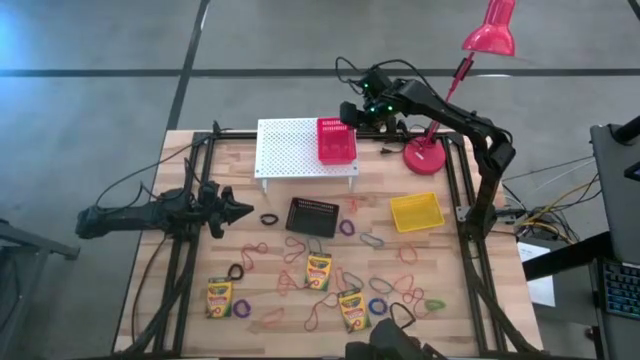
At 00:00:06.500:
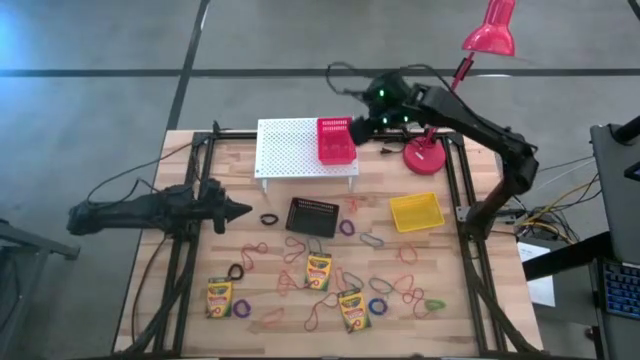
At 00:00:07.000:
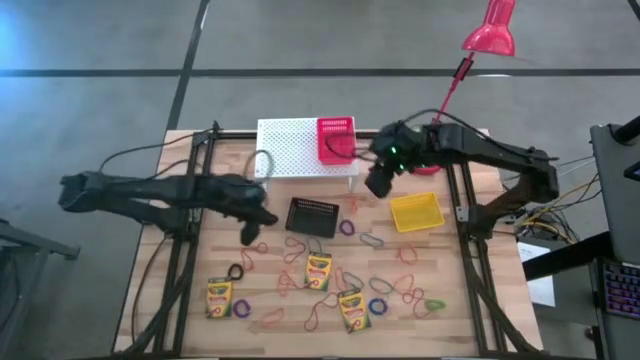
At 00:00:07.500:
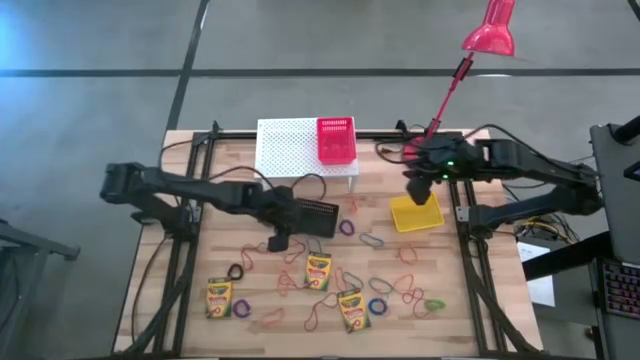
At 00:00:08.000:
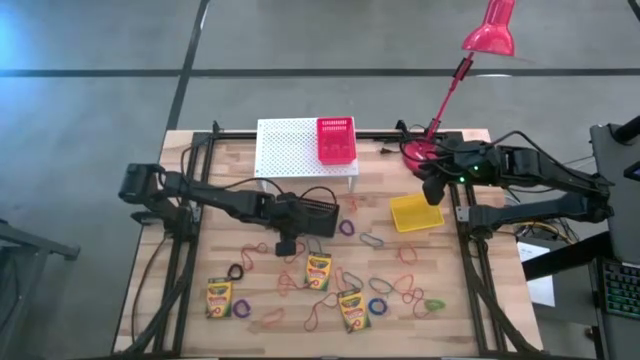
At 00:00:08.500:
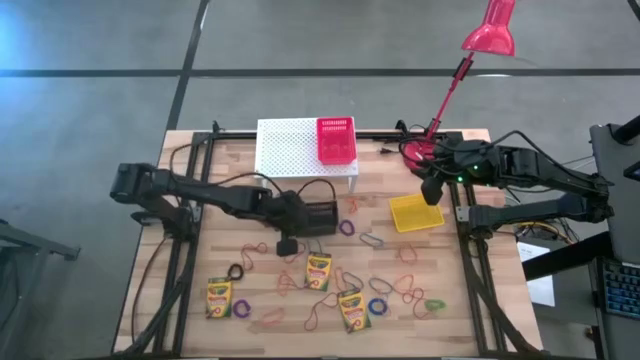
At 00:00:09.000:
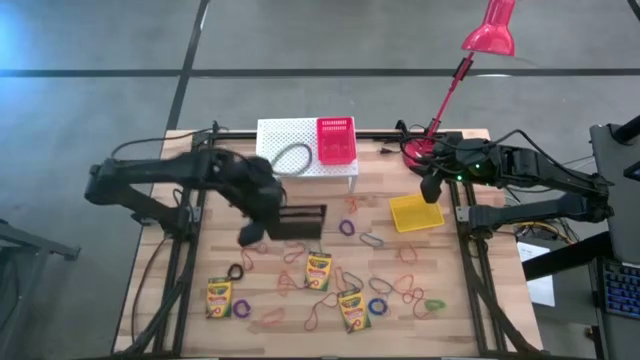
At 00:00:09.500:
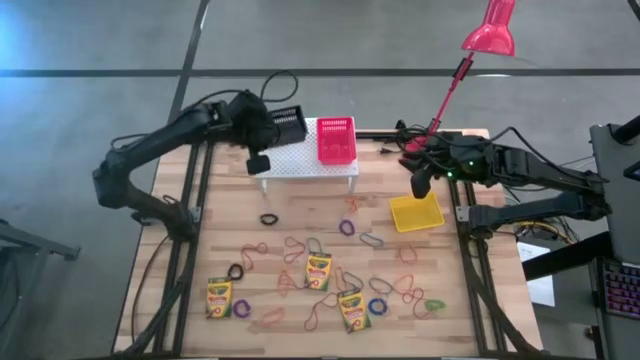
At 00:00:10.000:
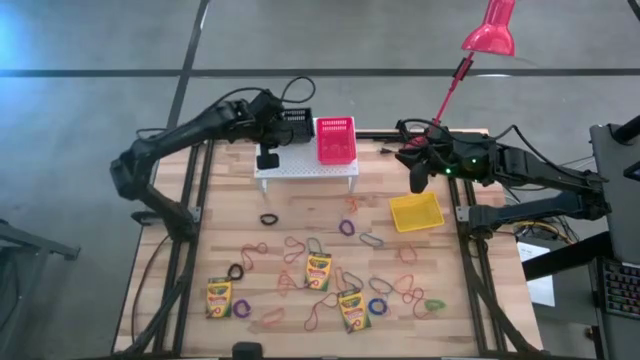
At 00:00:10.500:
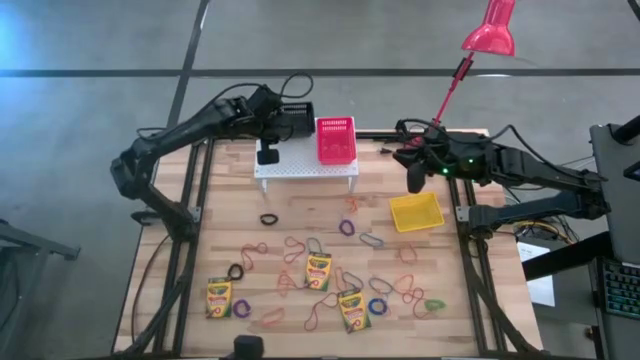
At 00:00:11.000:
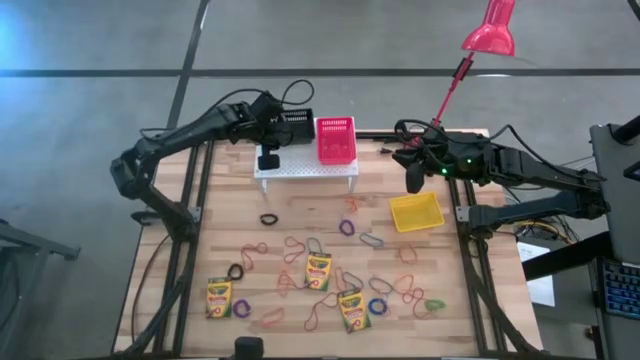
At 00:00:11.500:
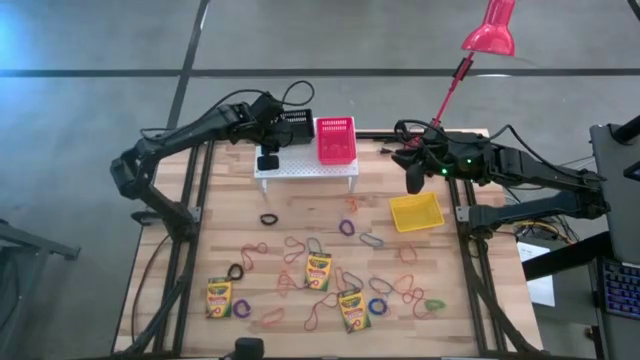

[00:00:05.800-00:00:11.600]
Task: Pick & Place Office Desk Supplies
Put the black basket on the shelf

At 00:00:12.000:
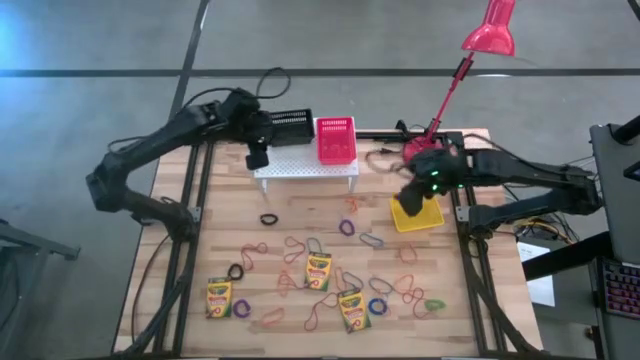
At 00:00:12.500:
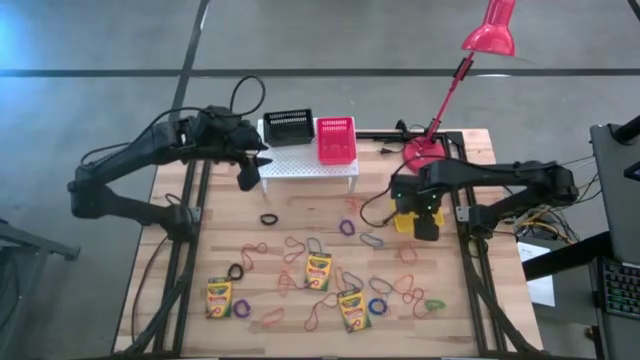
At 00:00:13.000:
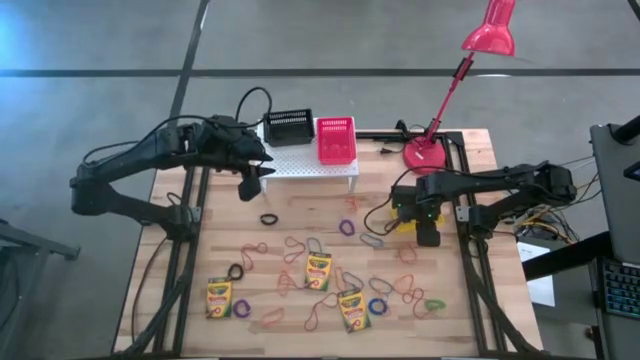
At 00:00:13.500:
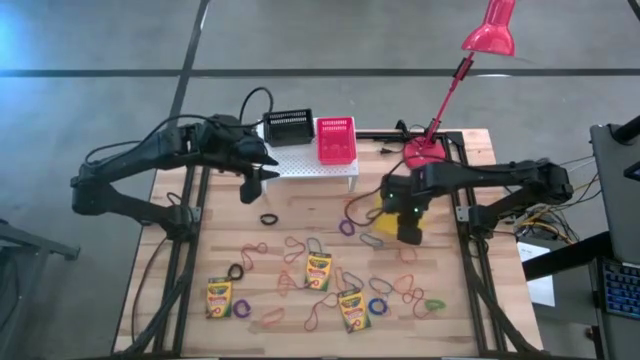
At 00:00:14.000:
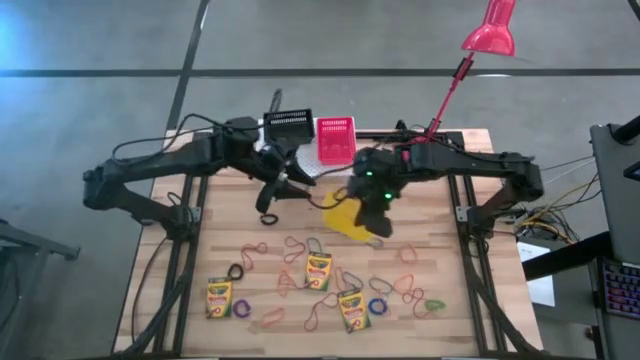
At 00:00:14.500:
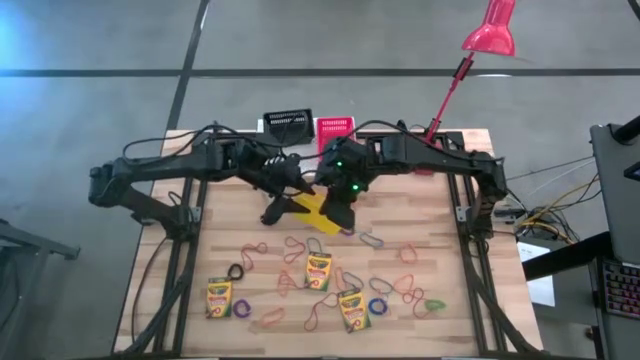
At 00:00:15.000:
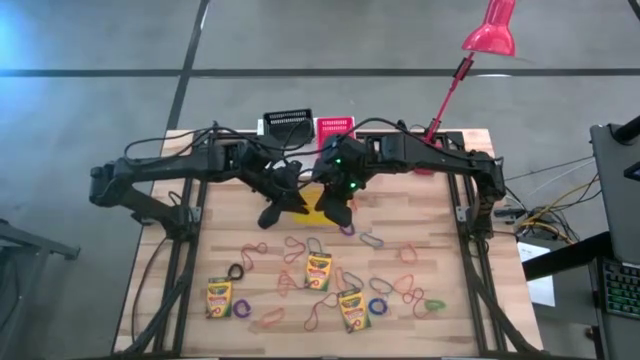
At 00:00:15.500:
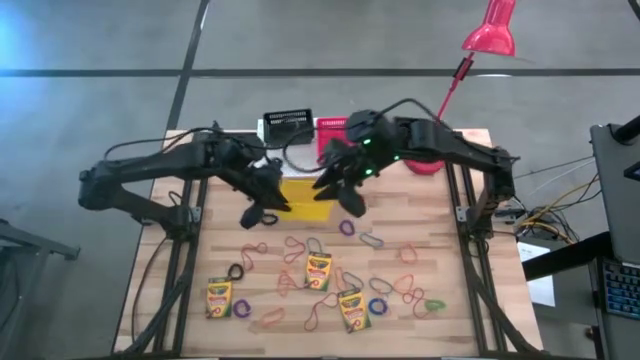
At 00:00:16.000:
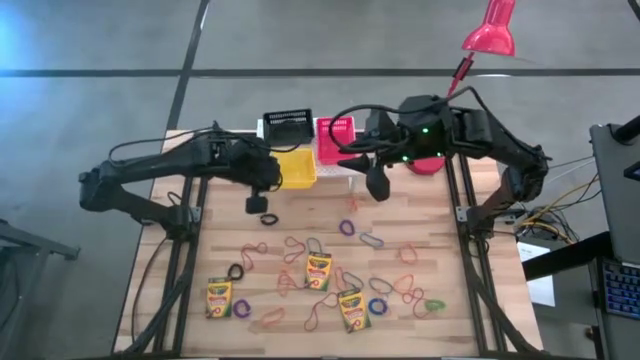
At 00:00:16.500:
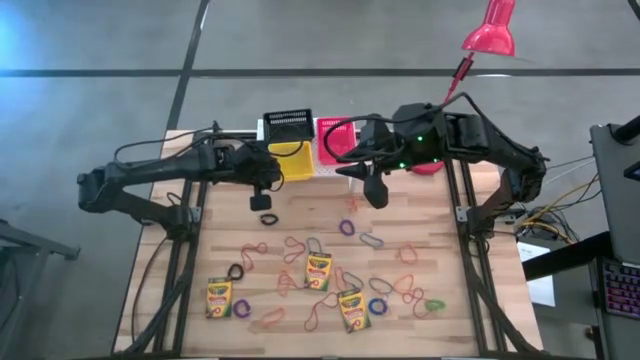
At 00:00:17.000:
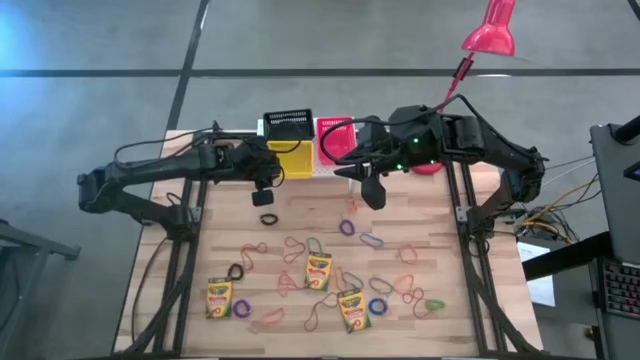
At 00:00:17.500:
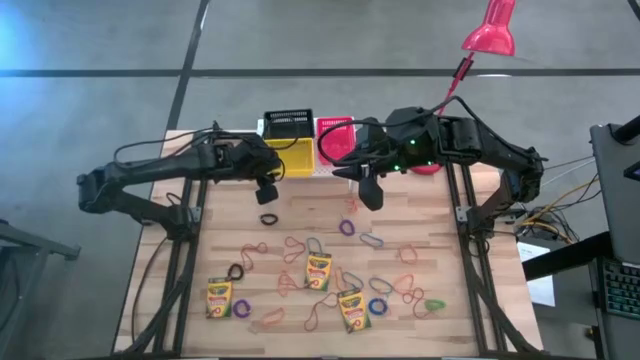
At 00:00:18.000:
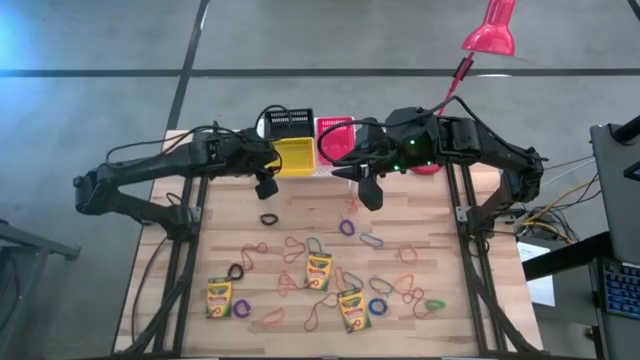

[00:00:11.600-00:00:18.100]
Put the yellow basket on the shelf

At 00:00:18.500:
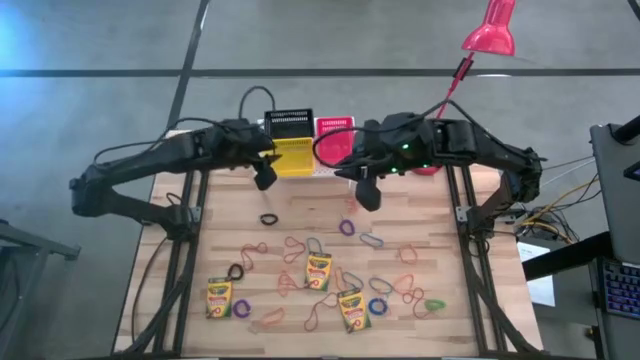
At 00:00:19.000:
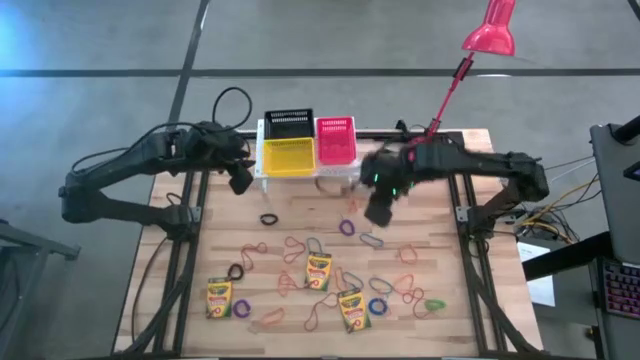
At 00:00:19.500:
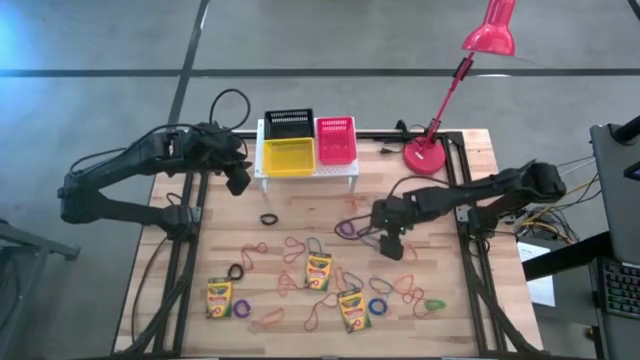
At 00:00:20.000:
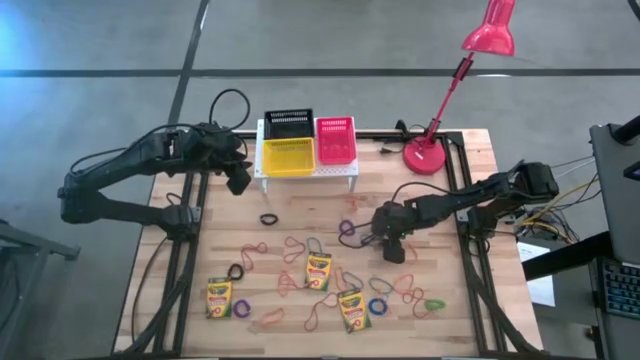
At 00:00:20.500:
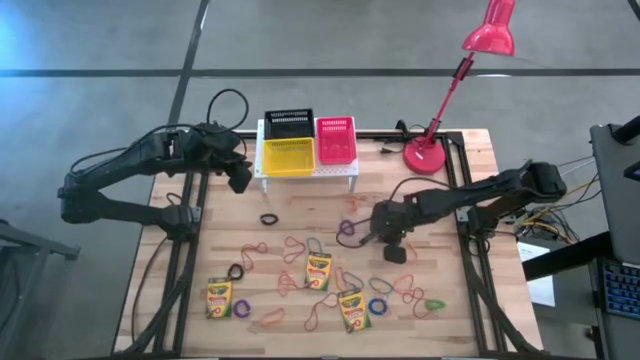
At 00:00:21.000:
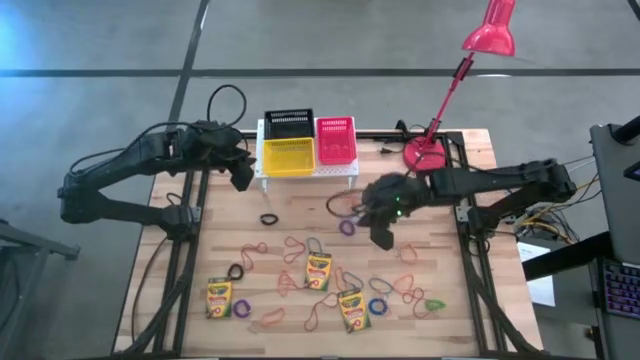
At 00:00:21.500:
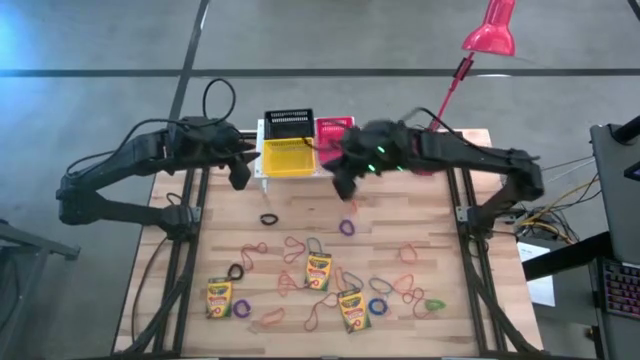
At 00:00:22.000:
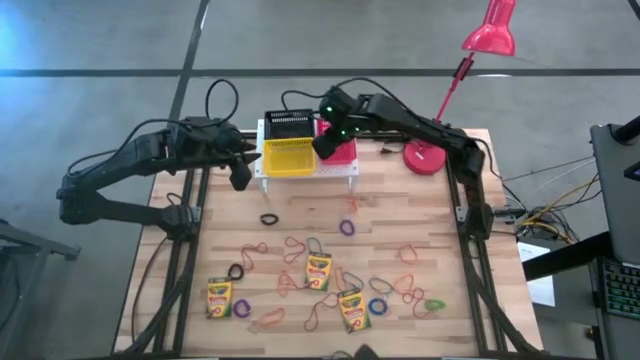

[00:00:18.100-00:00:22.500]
Put the blue rubber band into the red basket on the shelf

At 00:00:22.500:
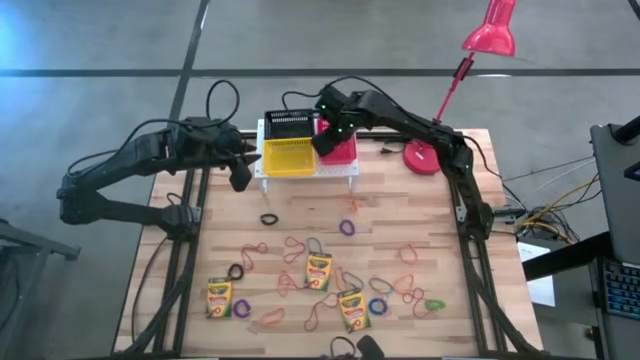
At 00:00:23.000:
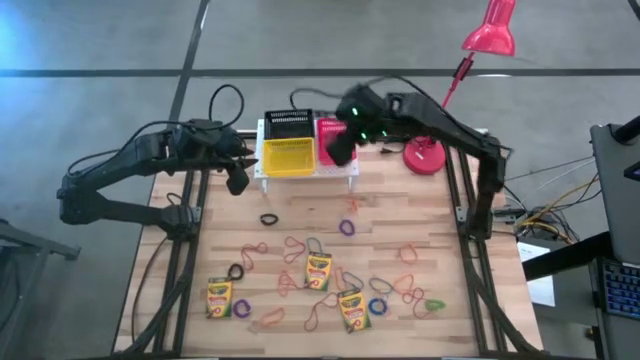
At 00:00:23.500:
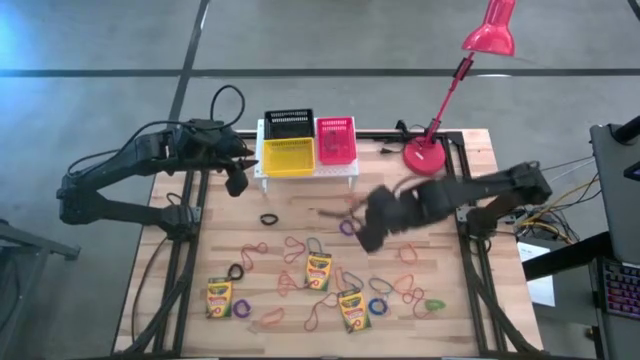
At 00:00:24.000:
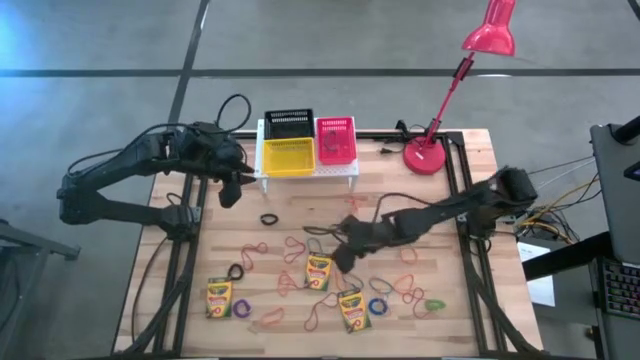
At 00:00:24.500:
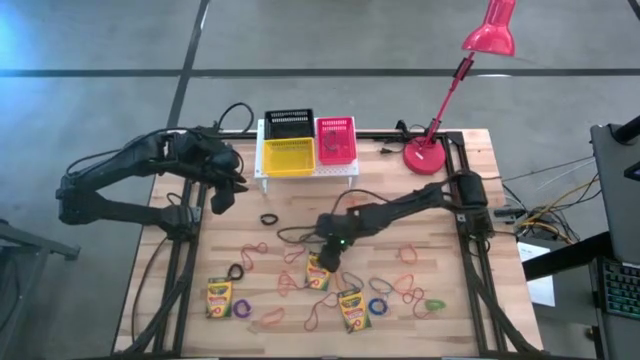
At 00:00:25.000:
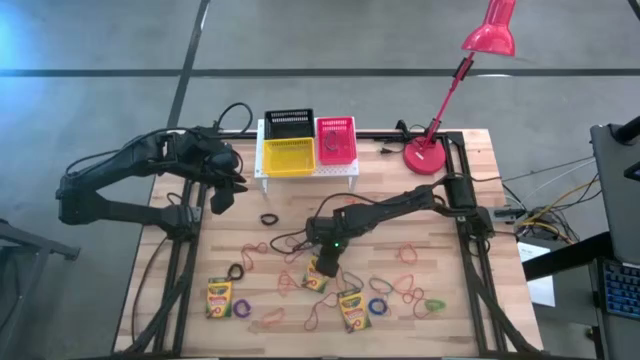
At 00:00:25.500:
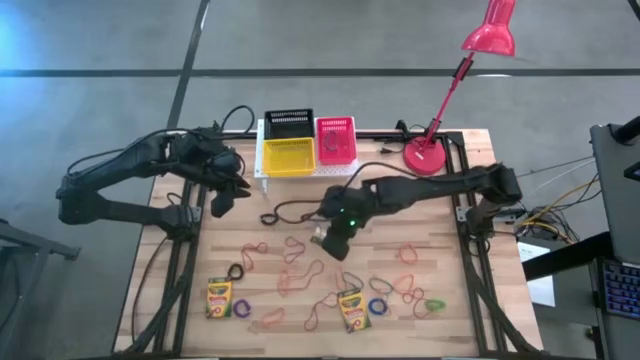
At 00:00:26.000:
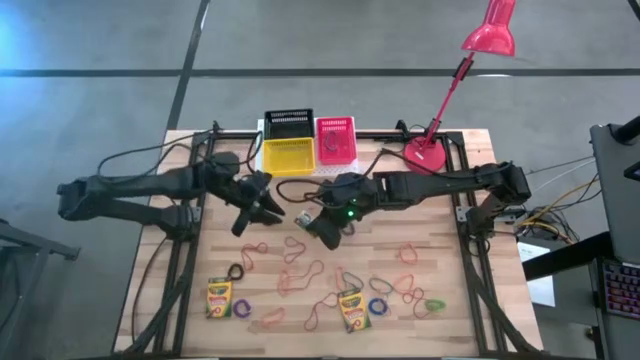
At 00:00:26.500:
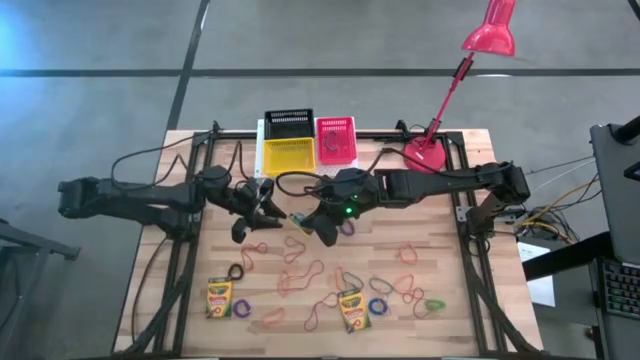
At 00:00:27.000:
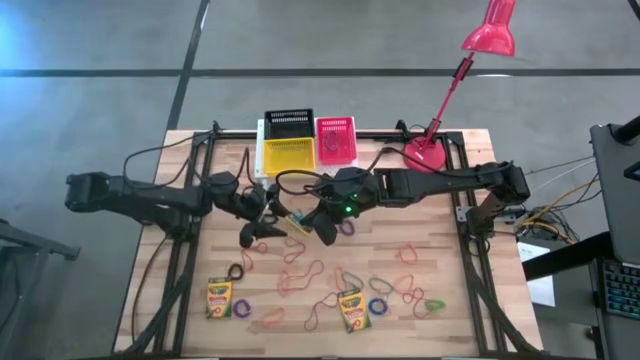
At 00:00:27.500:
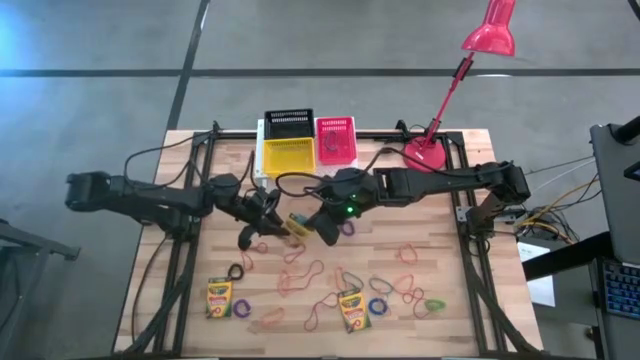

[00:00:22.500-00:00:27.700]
Put the yellow crayon box into the yellow basket on the shelf
